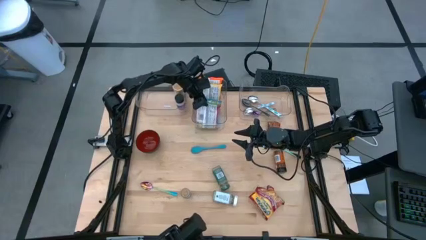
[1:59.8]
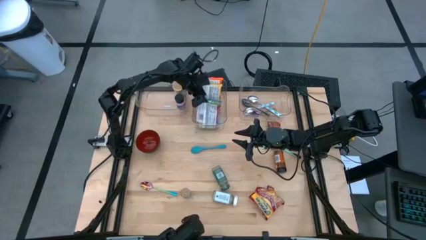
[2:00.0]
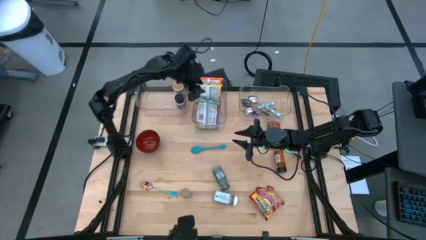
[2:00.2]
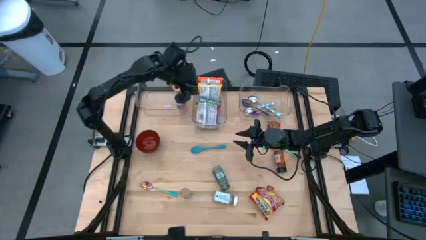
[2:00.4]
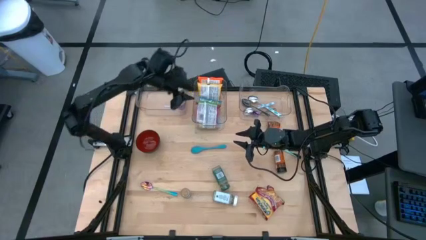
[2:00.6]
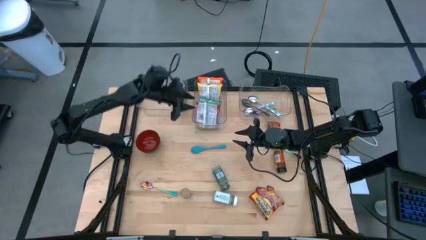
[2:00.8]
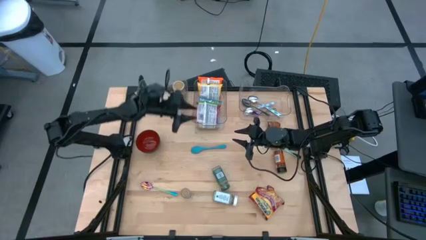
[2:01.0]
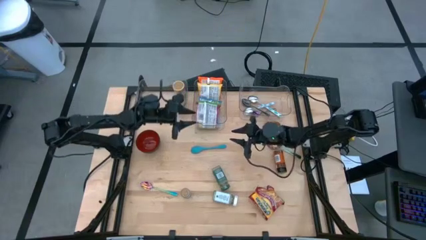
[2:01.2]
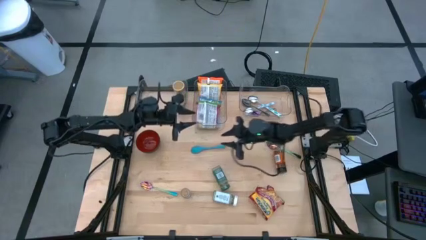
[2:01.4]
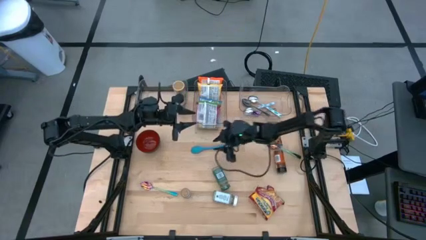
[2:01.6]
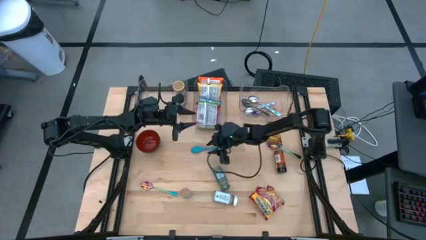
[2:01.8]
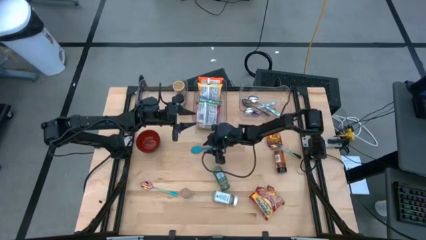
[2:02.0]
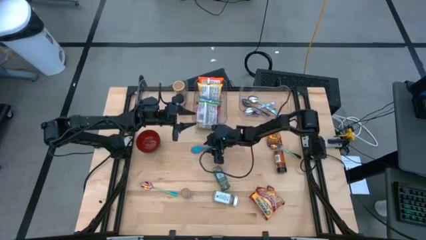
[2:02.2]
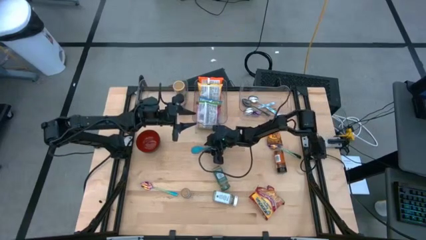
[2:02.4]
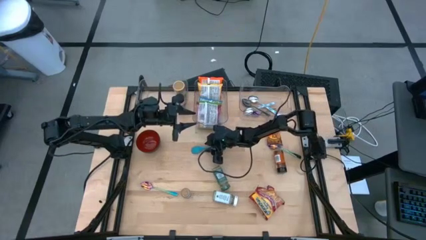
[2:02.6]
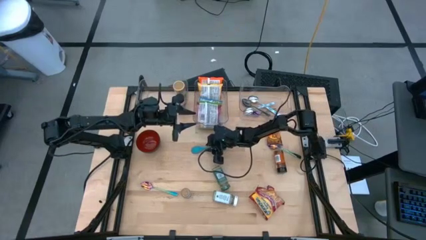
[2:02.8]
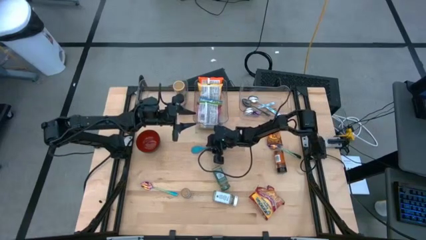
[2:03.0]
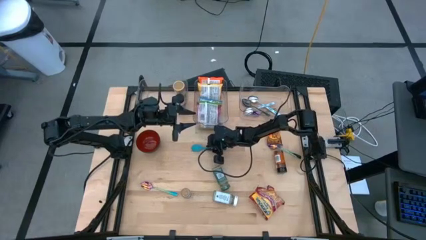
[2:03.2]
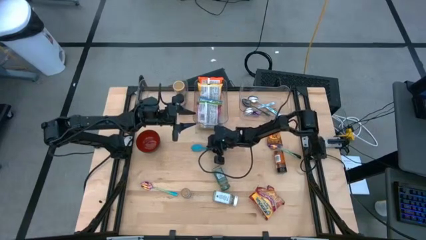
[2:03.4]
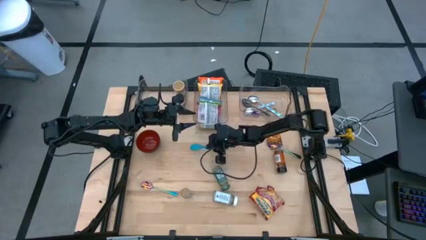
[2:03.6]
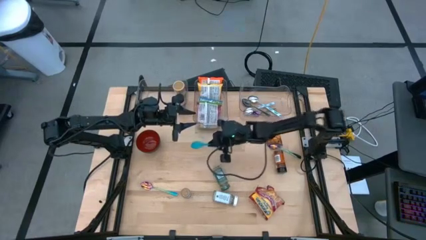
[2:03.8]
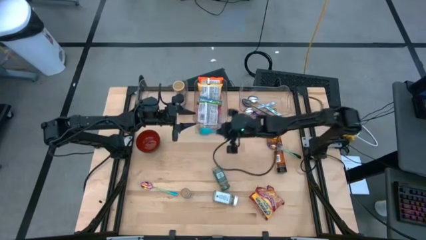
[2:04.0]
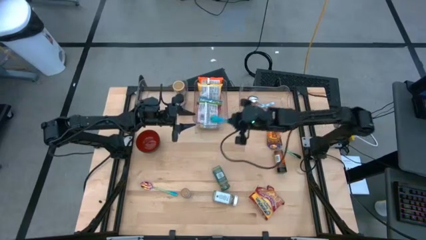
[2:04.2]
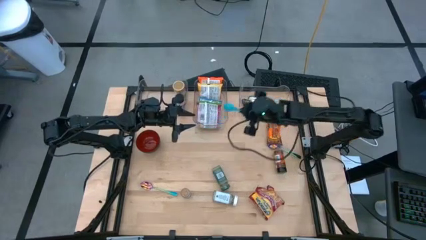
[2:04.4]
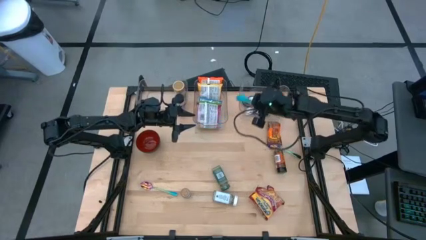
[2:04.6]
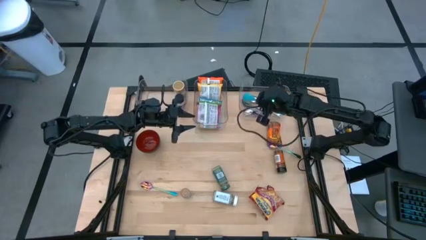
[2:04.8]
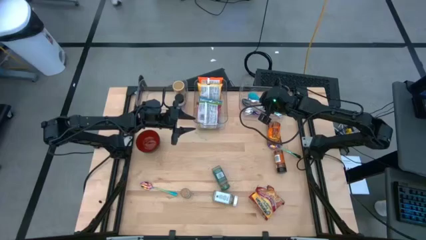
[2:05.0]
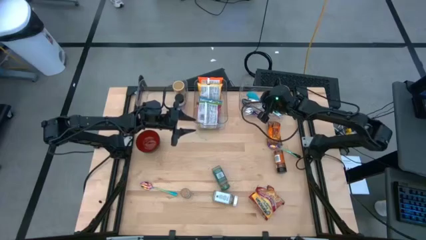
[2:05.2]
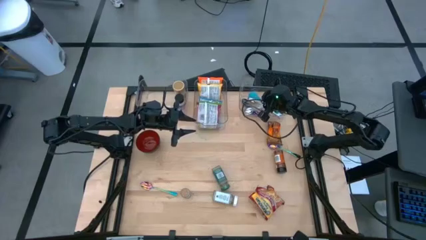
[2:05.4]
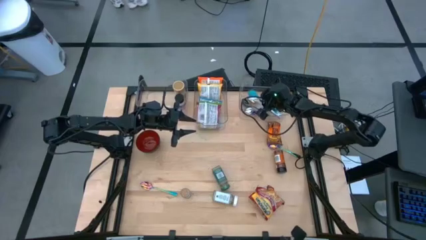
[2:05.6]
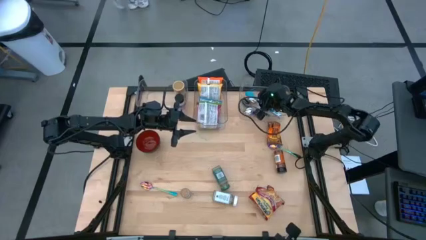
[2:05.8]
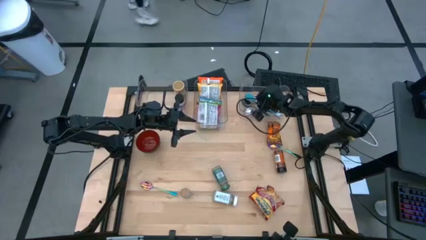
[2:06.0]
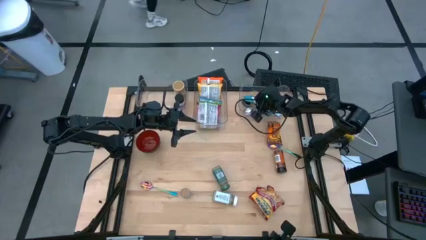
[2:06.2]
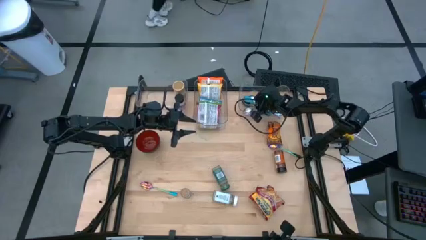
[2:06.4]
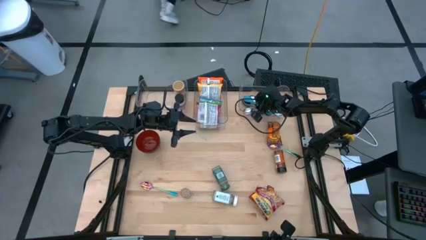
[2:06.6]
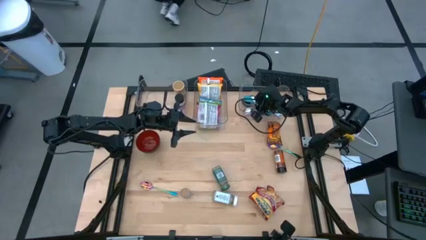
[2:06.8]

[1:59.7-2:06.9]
Task: Pick & Place Food Item
Put the blue baby spoon into the right transparent bin

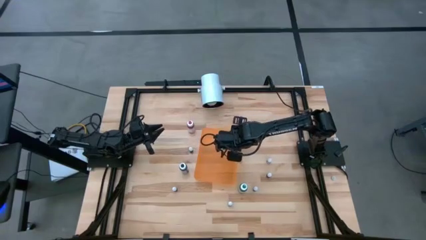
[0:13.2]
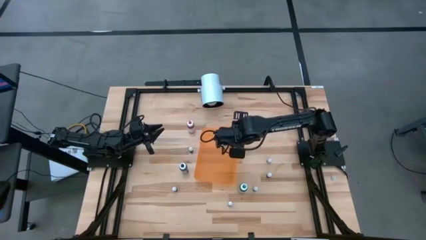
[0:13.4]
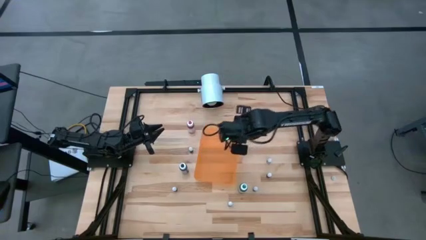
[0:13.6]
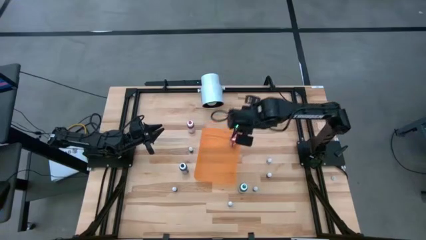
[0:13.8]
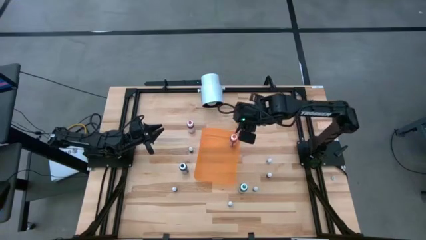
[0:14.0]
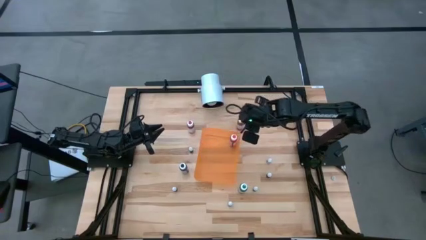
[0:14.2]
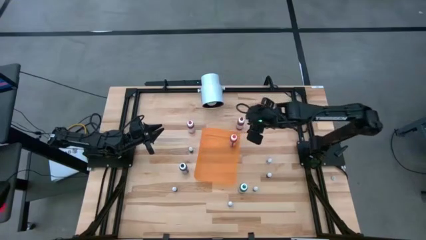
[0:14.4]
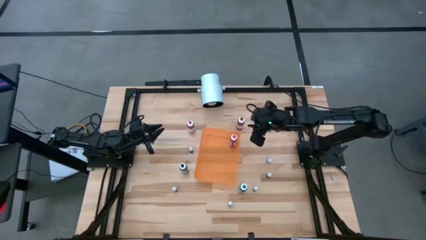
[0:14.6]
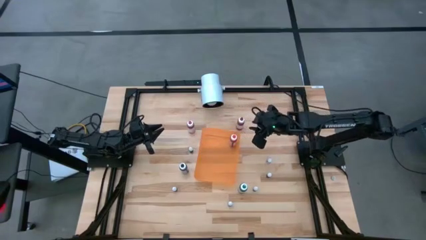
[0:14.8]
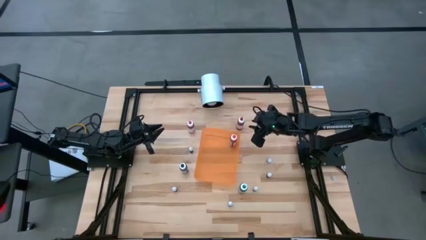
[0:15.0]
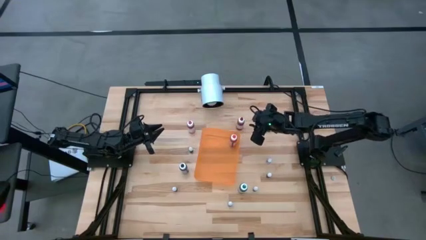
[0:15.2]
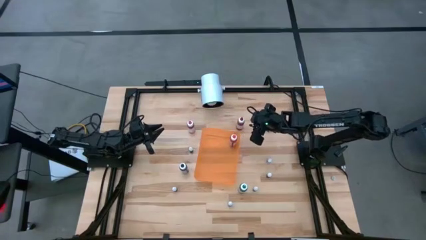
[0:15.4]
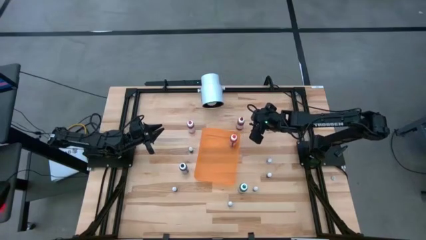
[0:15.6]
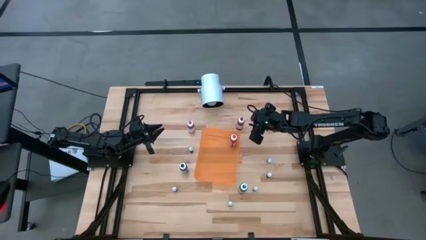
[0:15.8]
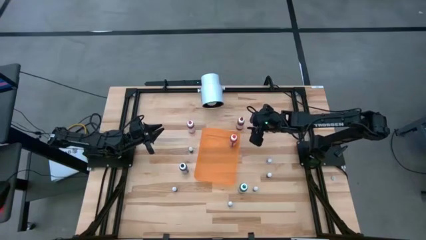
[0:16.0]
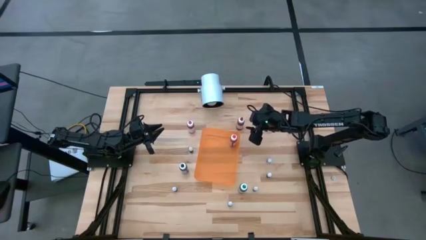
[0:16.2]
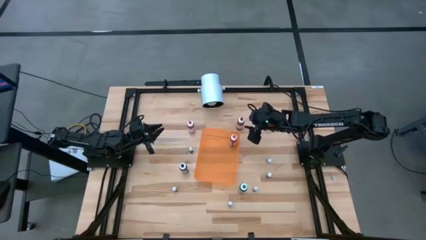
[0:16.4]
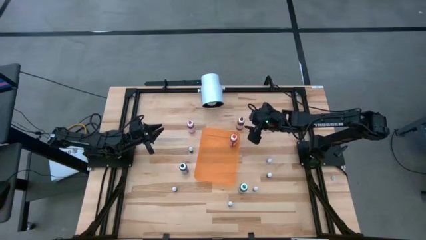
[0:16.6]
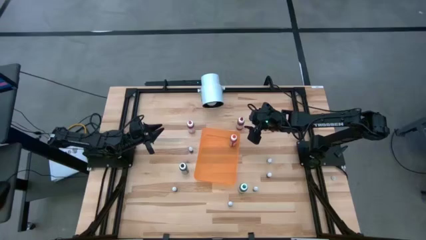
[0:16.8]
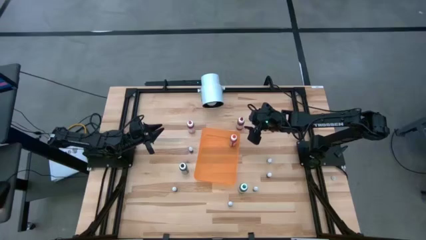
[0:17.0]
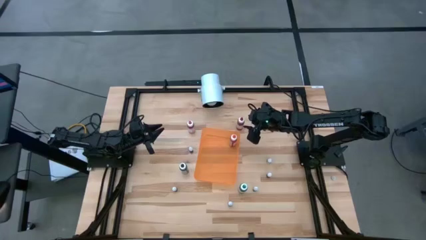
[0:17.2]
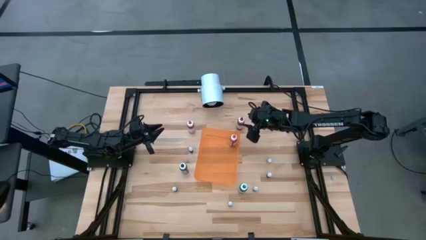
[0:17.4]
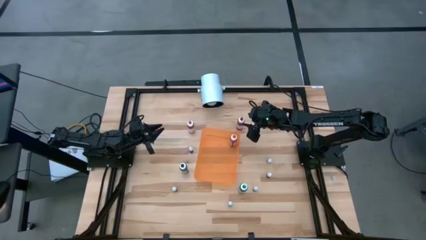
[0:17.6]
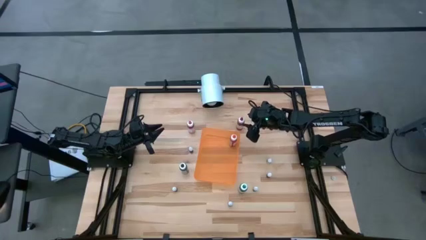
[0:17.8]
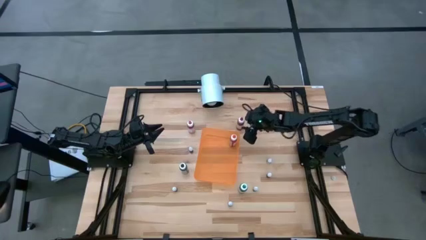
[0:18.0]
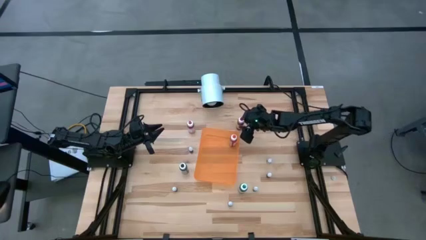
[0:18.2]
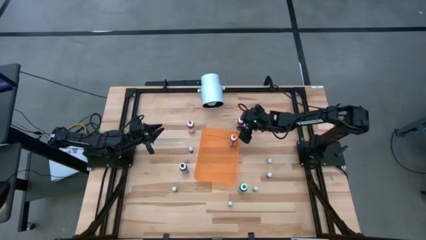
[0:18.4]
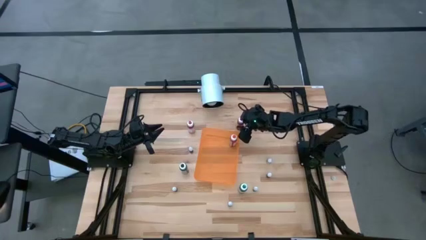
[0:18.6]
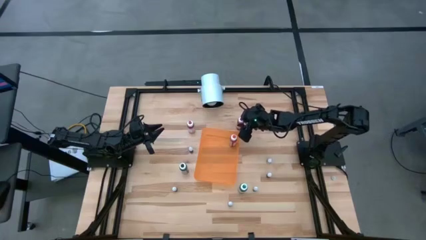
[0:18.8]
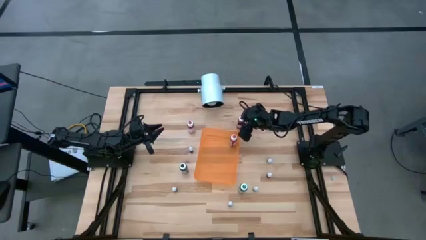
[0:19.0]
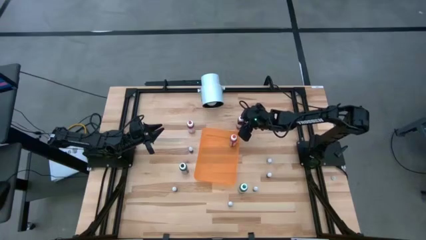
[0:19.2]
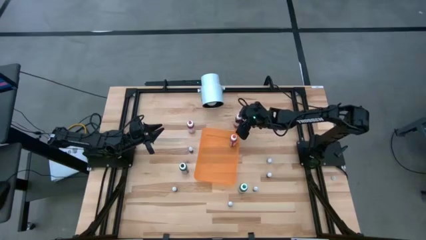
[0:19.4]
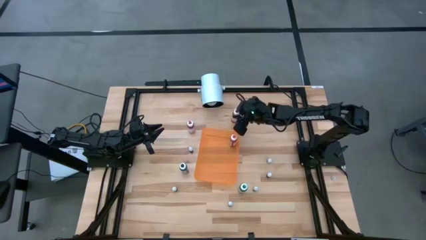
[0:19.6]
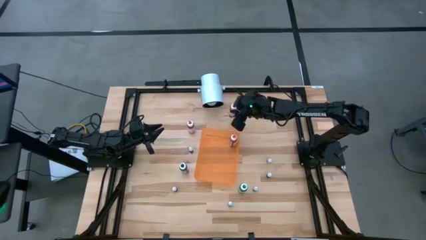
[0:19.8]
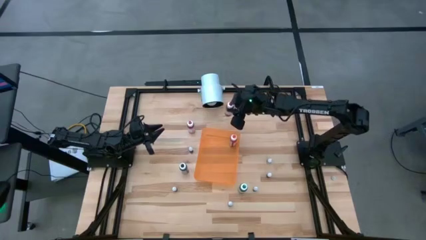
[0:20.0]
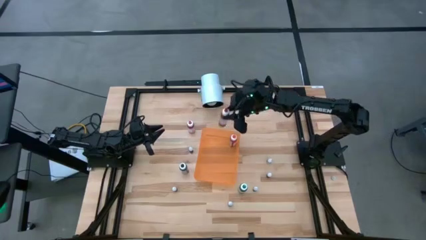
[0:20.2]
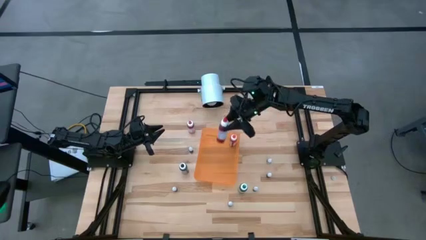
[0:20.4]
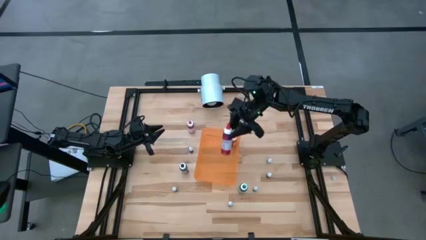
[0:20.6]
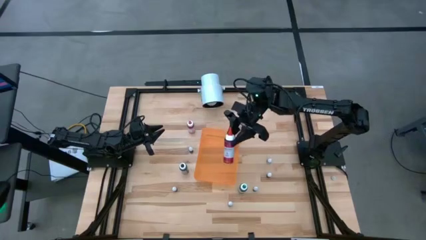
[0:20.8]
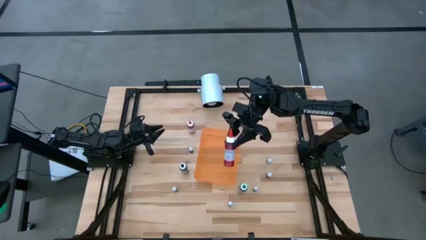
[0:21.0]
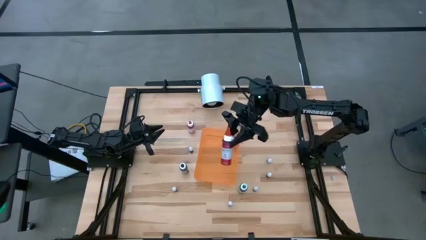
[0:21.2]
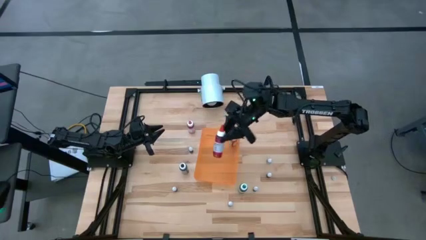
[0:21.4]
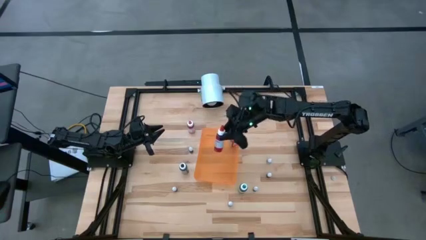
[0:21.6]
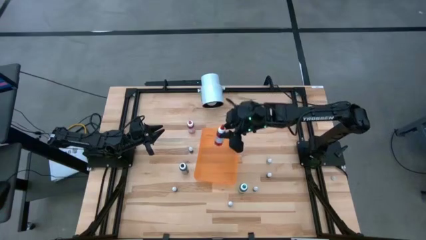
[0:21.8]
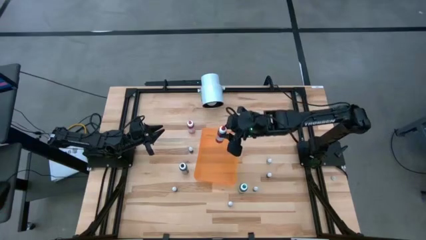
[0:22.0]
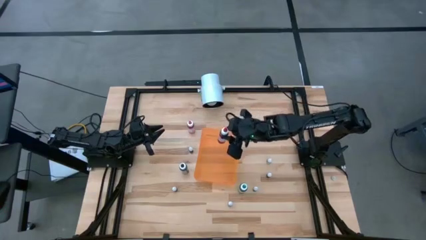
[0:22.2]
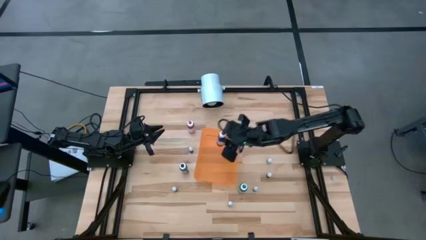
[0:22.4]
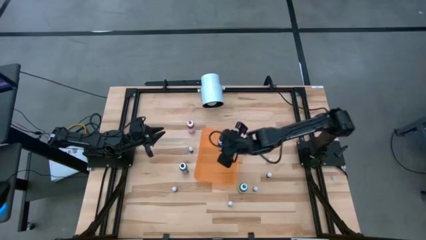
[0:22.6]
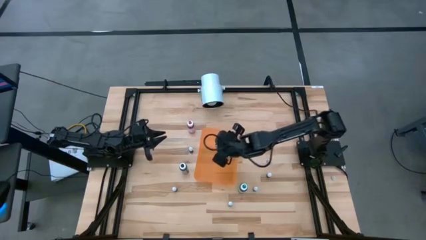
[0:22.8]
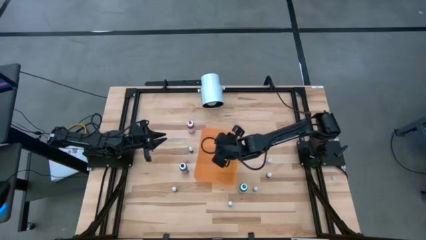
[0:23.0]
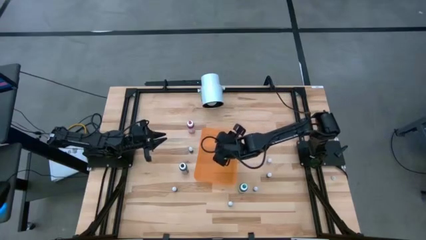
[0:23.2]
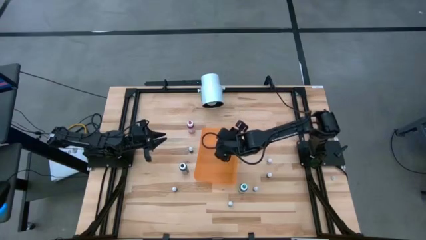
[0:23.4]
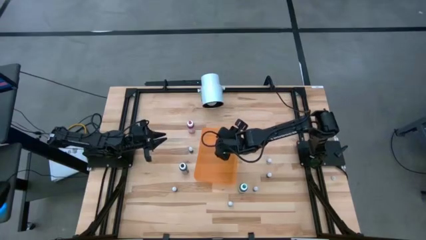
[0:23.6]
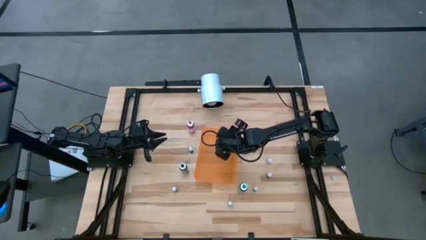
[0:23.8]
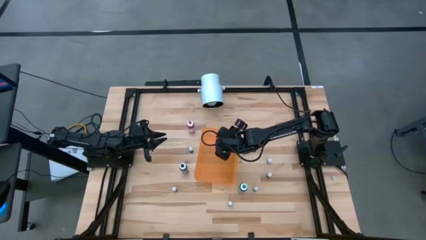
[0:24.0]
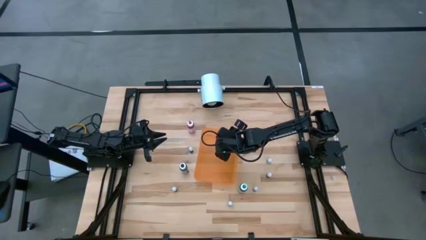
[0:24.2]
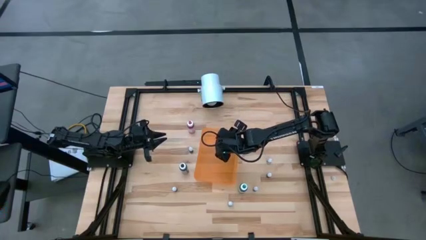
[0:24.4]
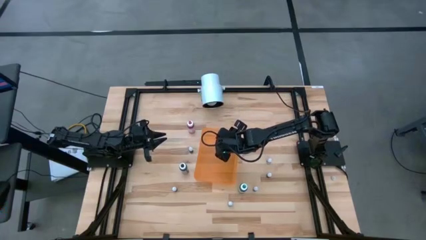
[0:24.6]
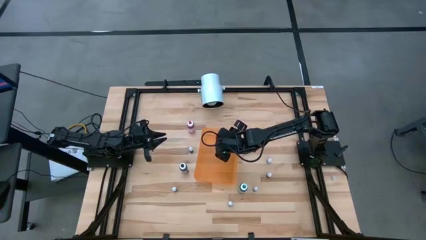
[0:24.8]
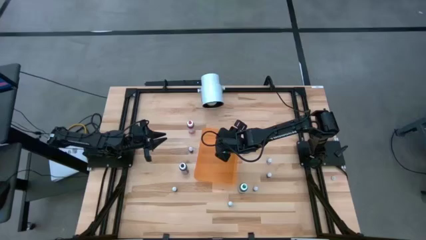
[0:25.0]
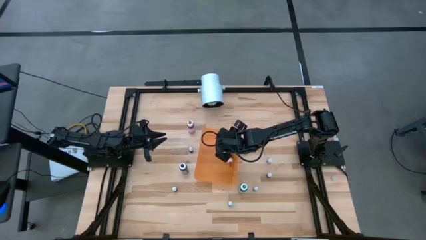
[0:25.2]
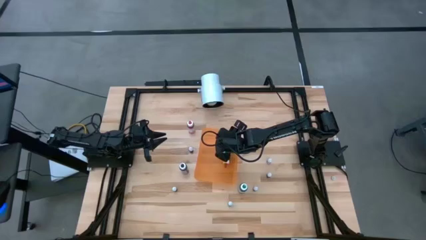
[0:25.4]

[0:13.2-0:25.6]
Task: Pick & Place food coloring
Put the large red food coloring bottle into the orange bin
